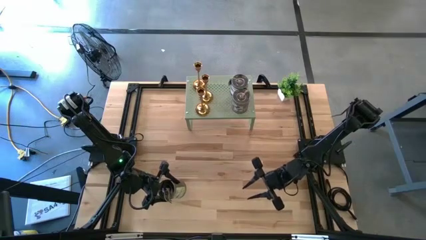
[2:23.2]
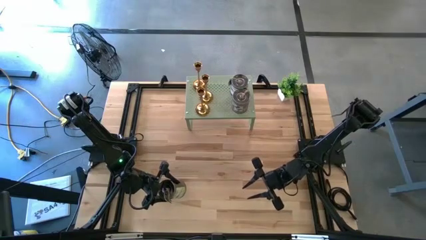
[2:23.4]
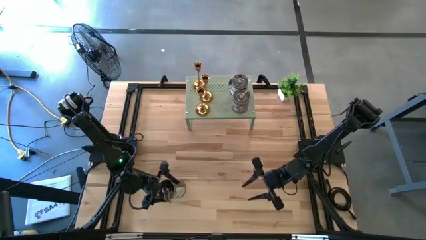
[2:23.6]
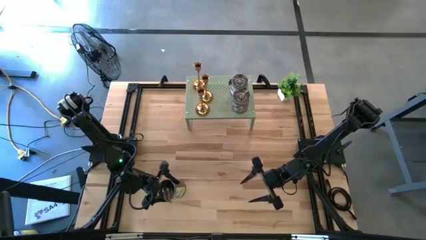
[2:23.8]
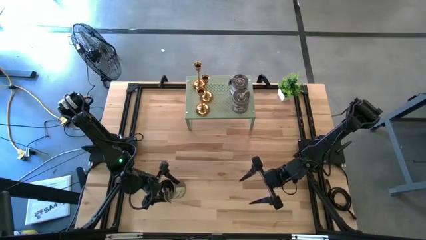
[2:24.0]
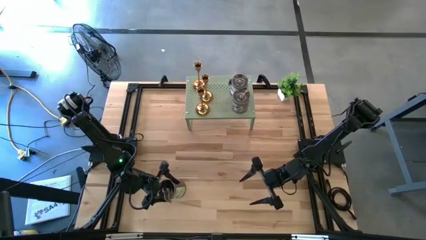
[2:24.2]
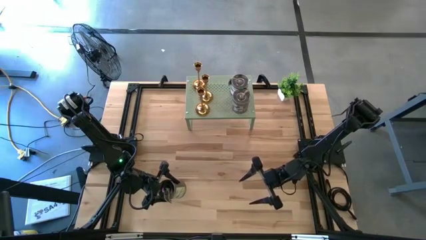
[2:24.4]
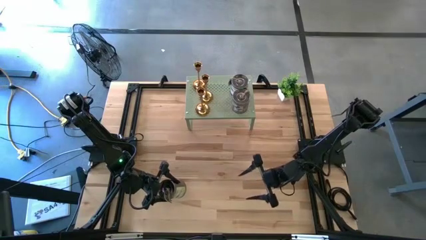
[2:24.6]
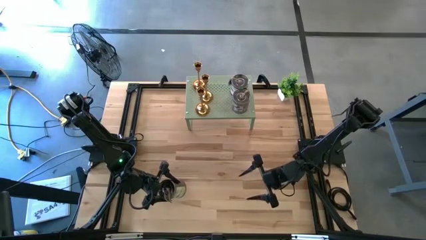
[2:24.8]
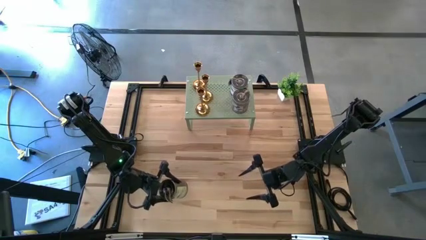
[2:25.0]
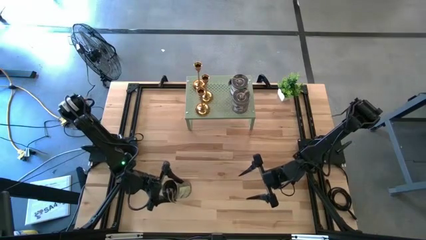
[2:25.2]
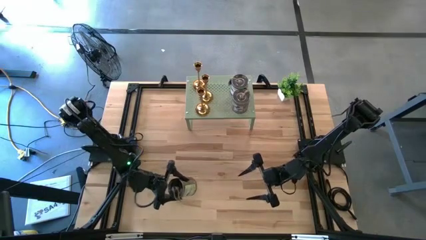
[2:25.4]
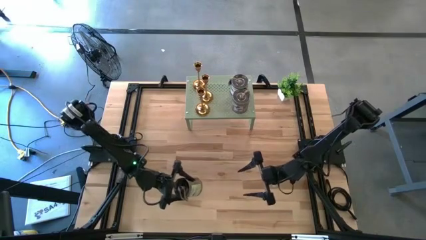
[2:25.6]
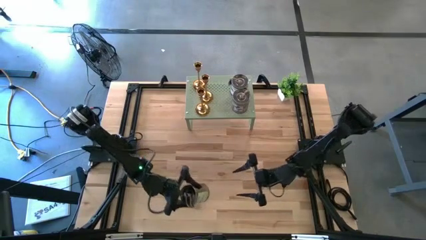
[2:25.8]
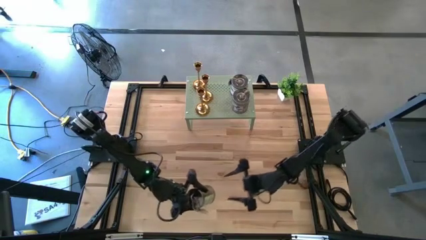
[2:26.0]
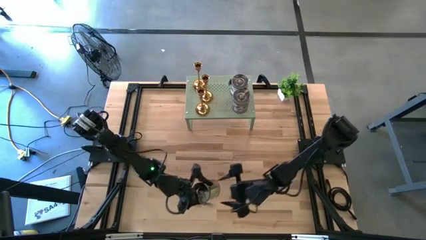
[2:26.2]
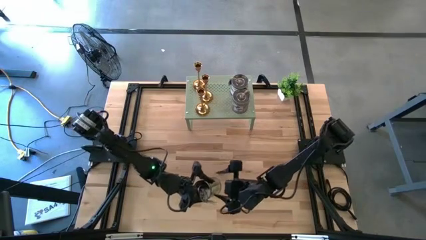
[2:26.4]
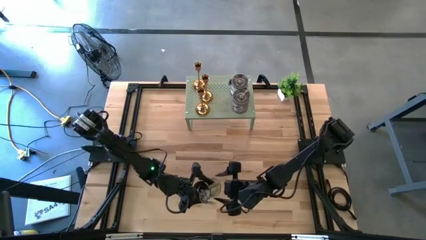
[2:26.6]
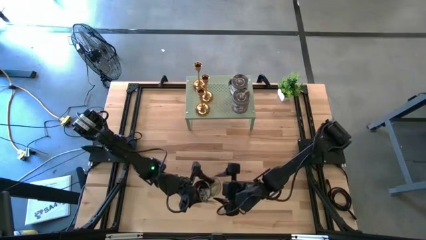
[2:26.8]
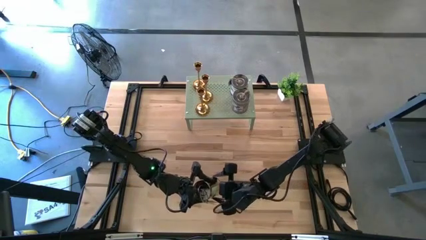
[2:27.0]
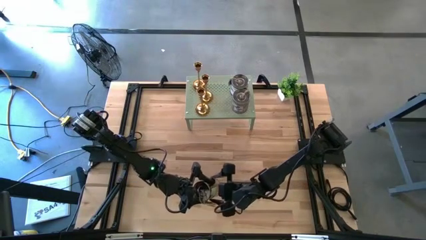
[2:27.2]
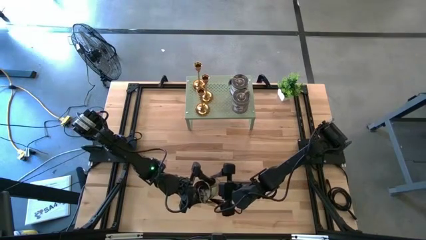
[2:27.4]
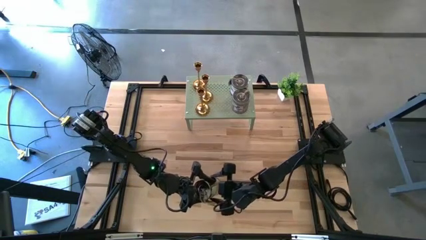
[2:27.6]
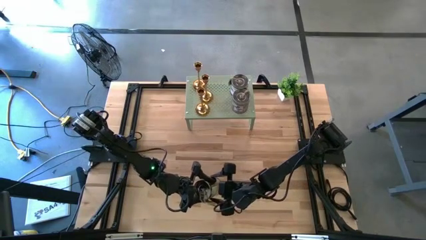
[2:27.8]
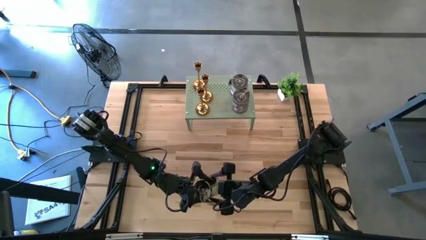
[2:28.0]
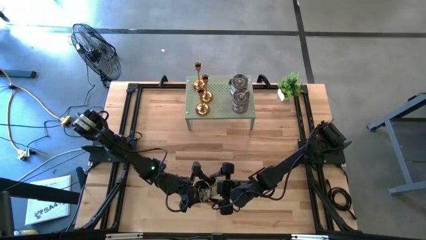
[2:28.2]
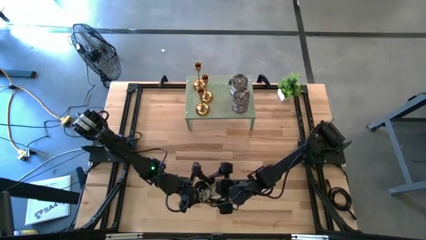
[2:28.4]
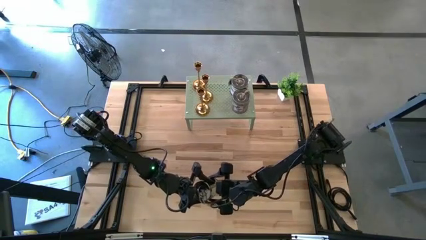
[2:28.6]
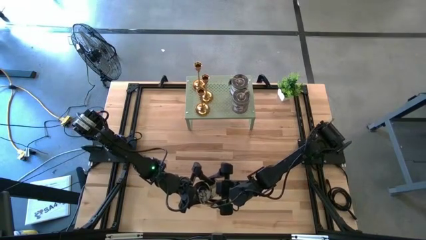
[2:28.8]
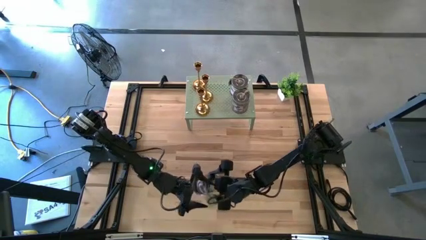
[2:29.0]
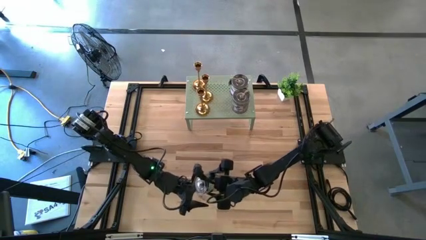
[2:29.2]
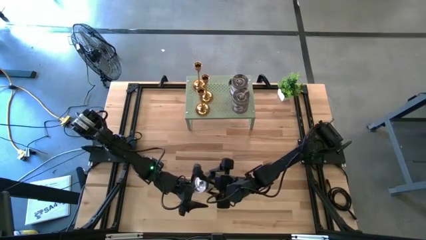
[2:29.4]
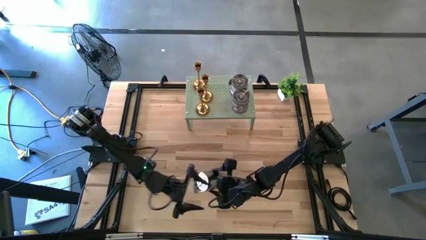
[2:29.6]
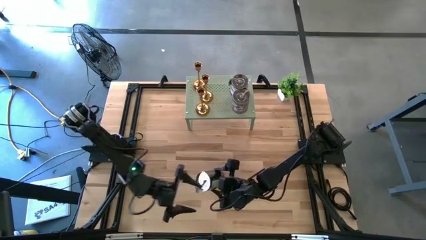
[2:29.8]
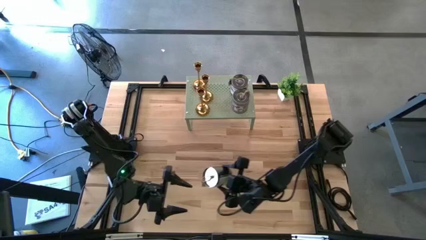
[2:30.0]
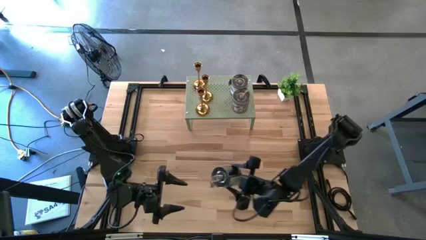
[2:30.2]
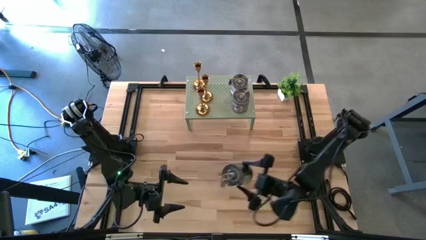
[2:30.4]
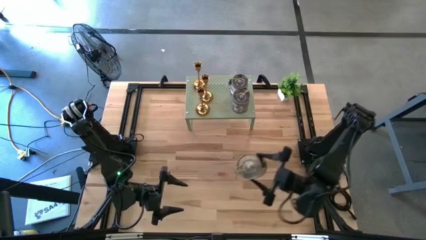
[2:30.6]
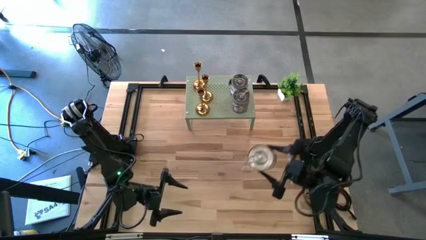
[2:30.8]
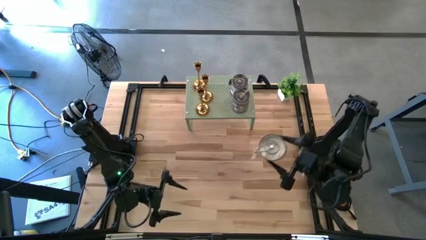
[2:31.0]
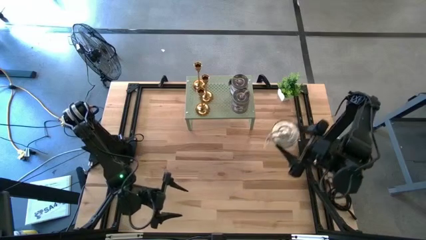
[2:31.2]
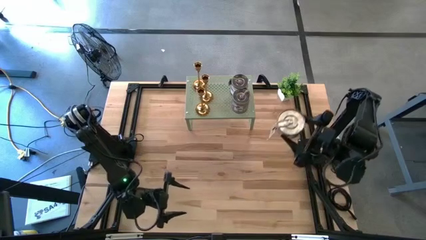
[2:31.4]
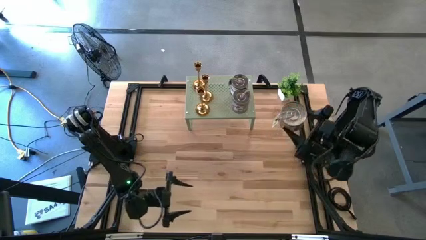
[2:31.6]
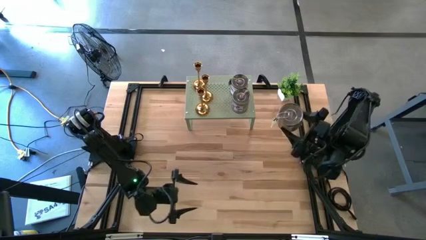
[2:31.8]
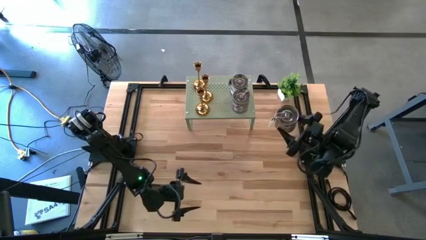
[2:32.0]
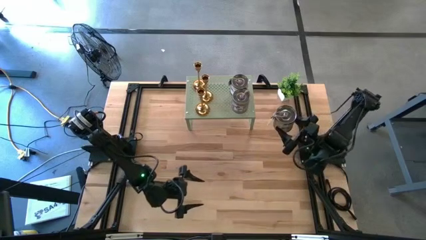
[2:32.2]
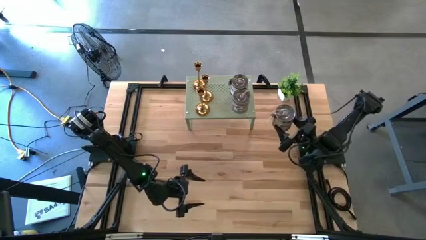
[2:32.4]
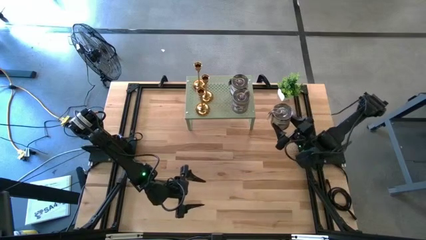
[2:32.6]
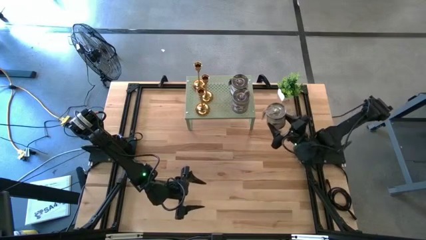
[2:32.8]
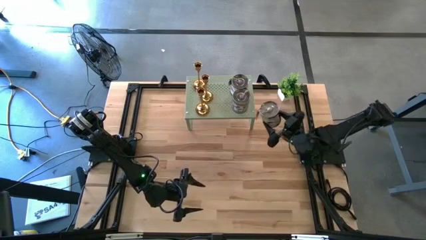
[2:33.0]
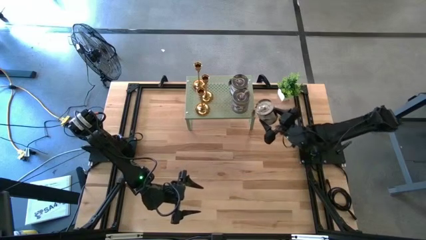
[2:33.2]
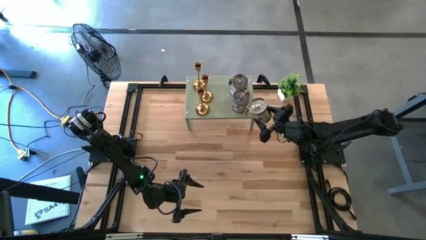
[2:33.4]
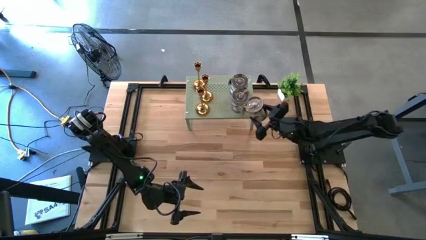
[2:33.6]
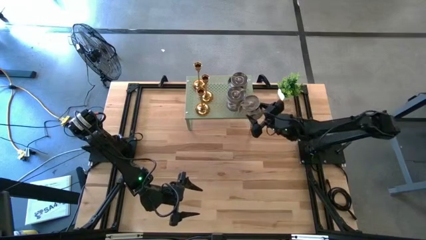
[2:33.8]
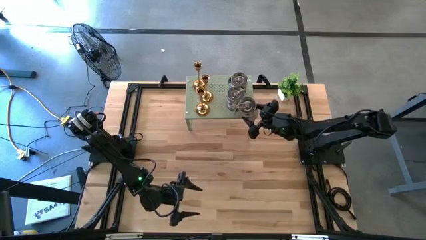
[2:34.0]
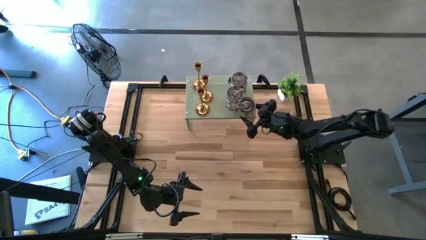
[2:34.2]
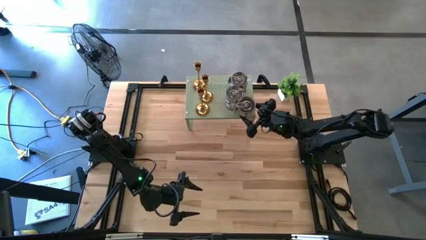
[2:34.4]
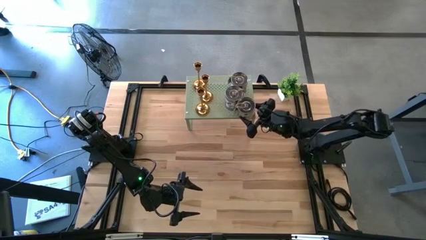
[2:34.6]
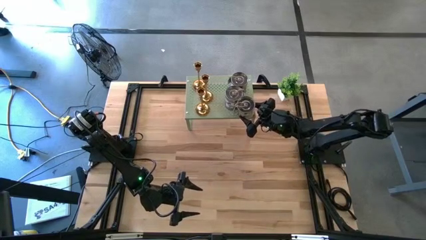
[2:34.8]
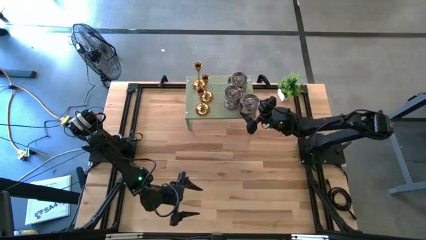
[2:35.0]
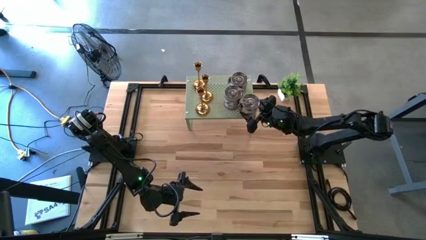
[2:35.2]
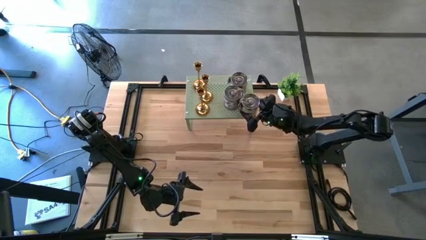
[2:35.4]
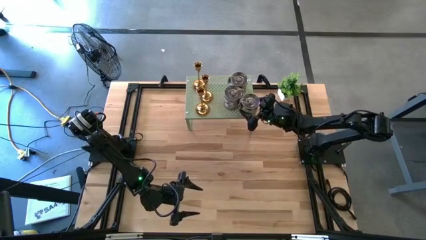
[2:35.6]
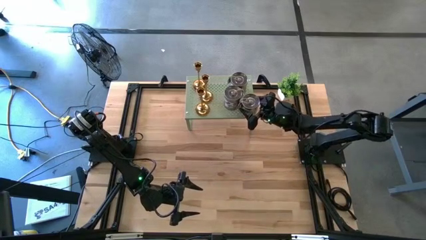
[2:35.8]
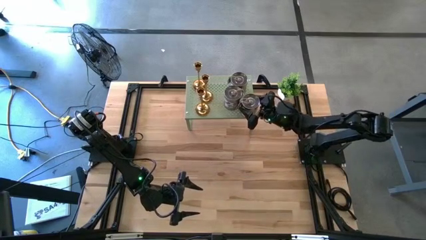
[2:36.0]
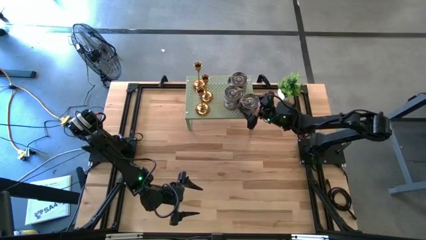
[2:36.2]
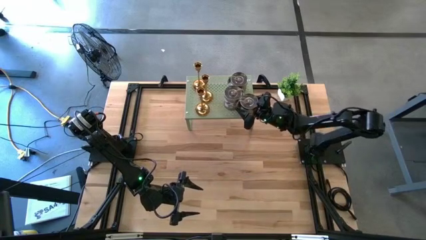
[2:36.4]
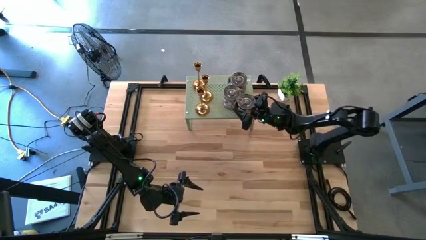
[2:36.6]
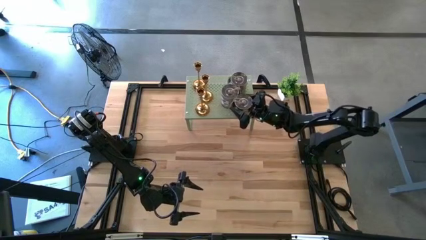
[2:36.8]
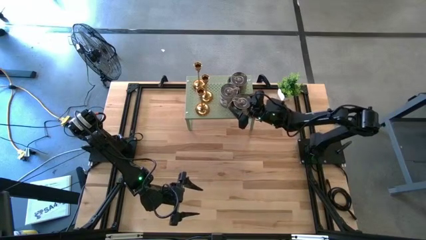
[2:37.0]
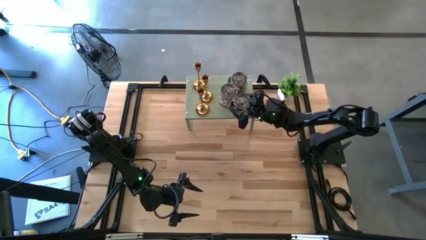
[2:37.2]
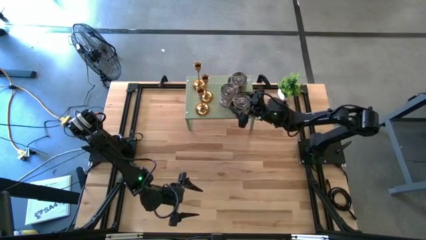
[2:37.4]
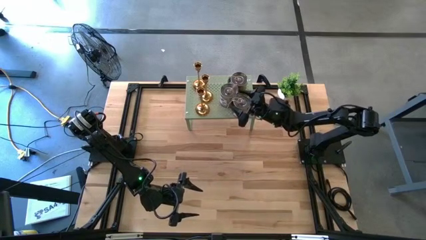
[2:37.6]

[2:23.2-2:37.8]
Task: Pick & Place candle stick holders
Put the silver scented candle on the shelf aligned with the other silver scented candles
